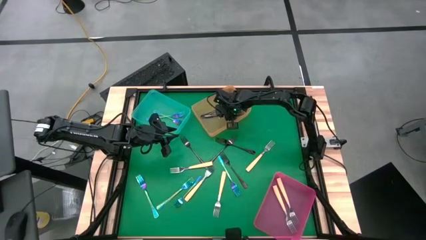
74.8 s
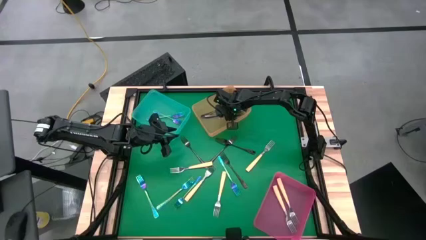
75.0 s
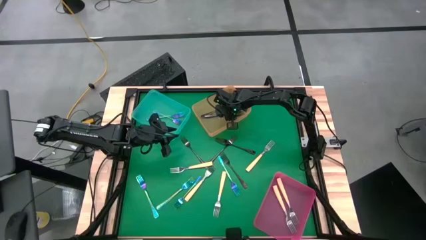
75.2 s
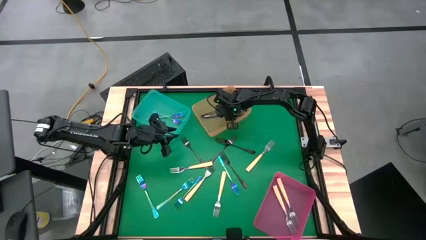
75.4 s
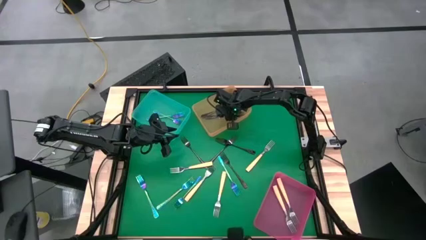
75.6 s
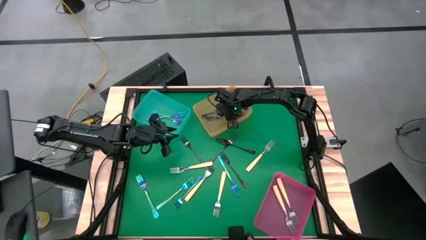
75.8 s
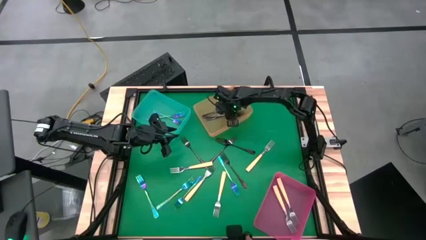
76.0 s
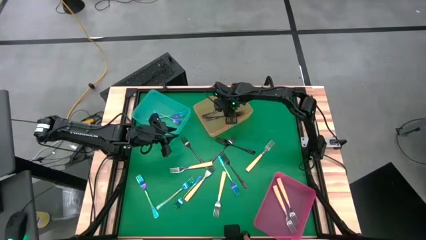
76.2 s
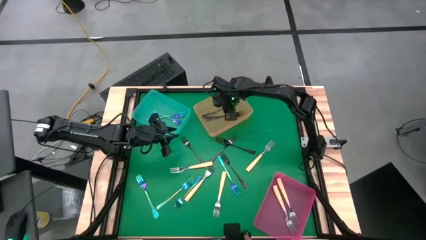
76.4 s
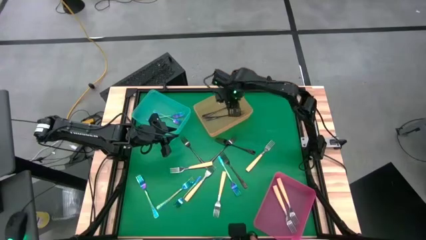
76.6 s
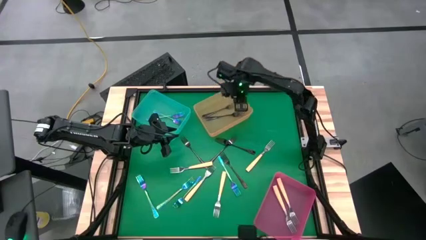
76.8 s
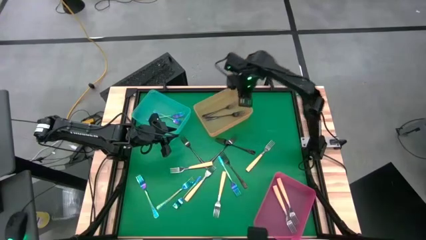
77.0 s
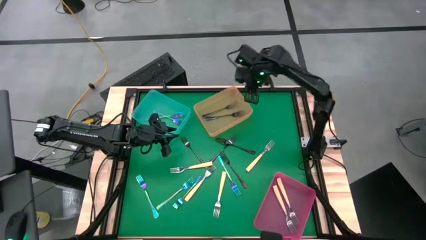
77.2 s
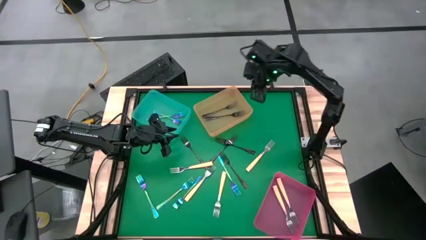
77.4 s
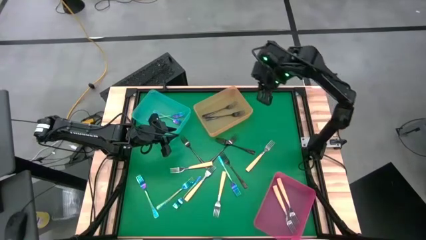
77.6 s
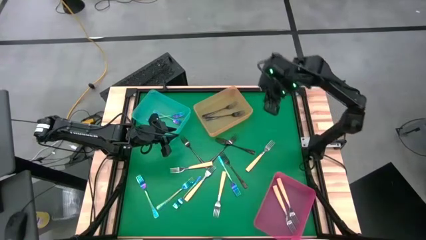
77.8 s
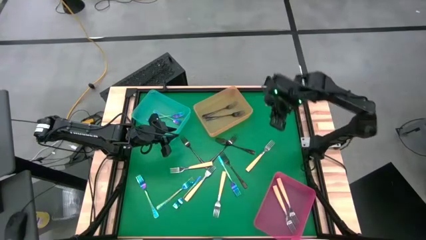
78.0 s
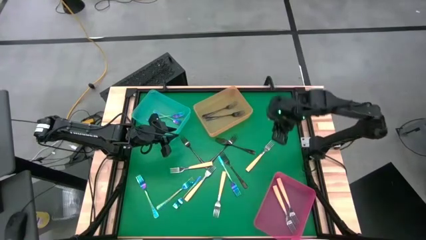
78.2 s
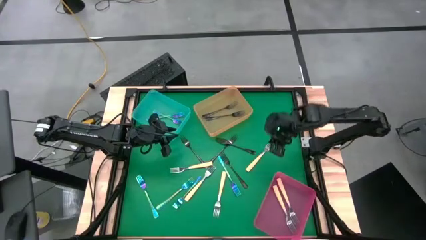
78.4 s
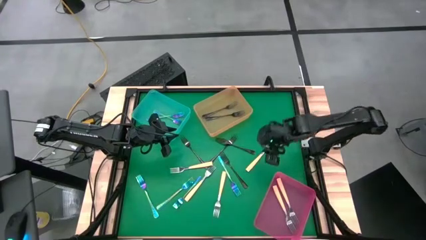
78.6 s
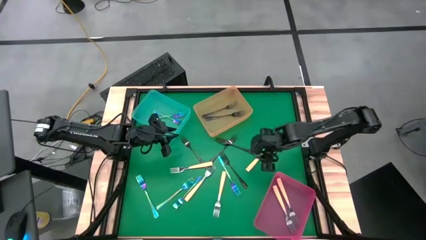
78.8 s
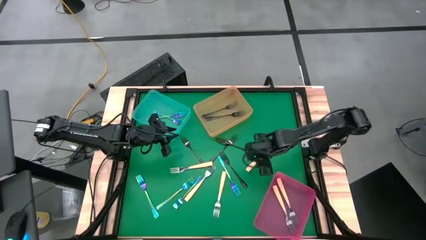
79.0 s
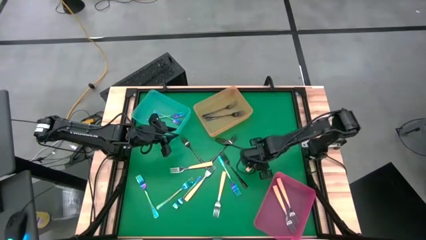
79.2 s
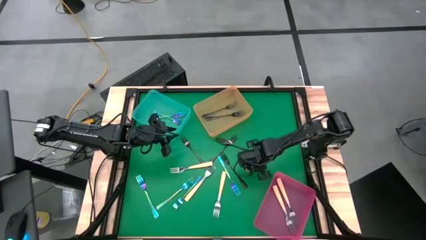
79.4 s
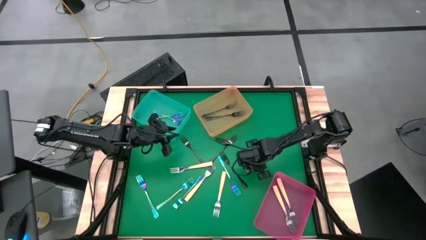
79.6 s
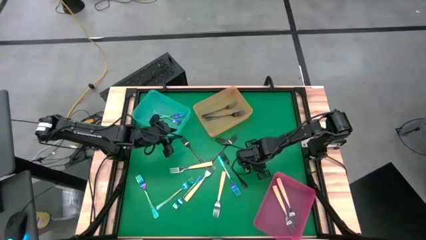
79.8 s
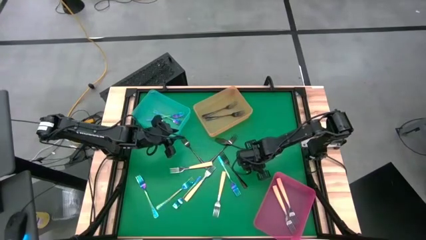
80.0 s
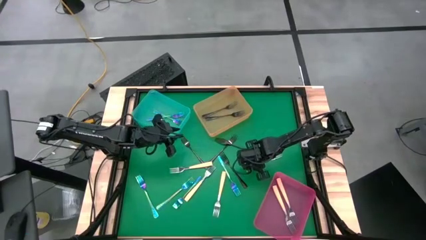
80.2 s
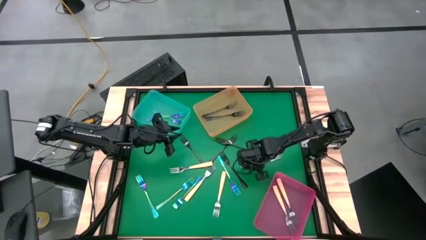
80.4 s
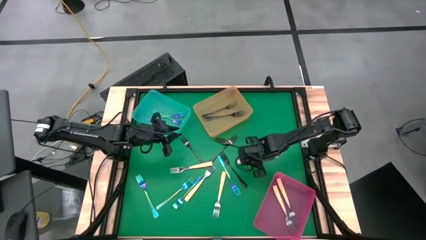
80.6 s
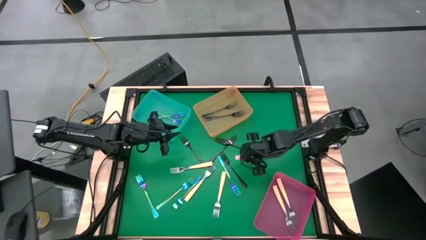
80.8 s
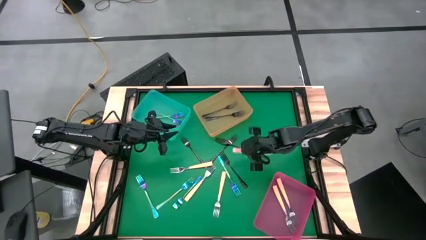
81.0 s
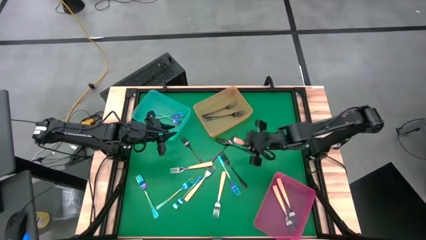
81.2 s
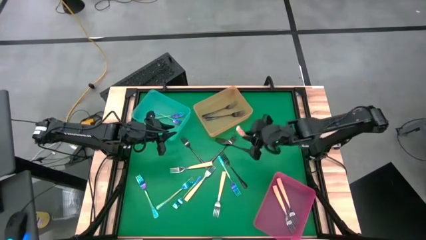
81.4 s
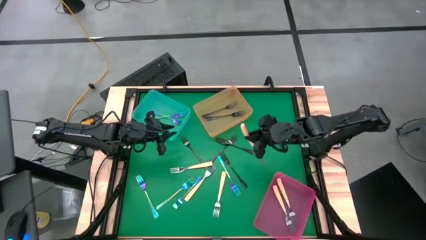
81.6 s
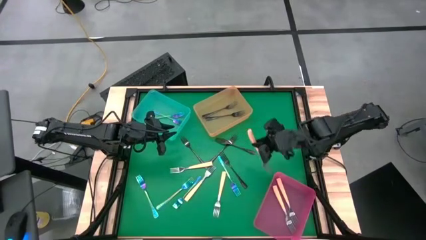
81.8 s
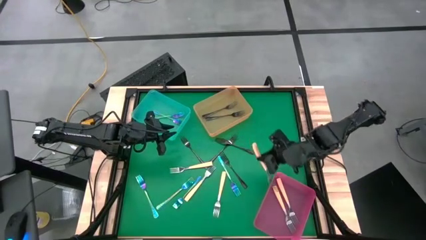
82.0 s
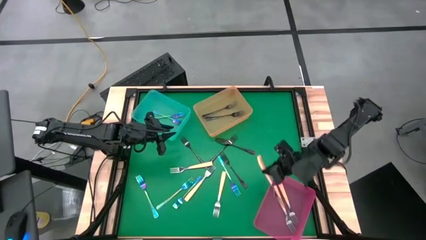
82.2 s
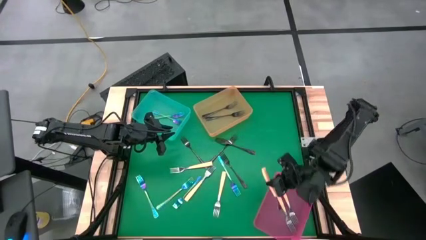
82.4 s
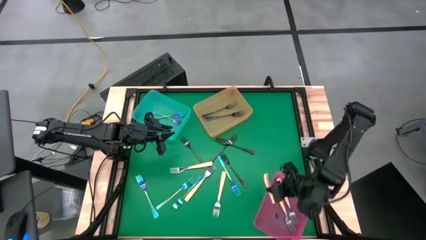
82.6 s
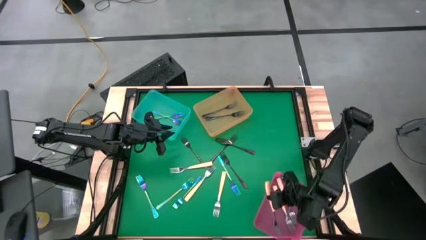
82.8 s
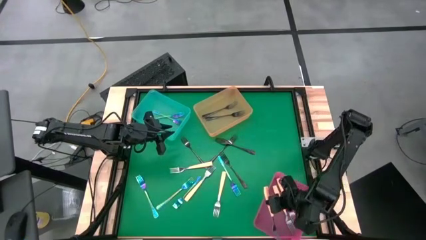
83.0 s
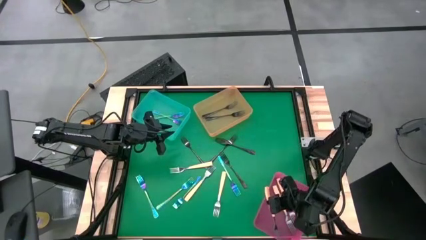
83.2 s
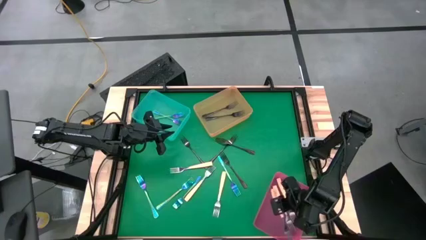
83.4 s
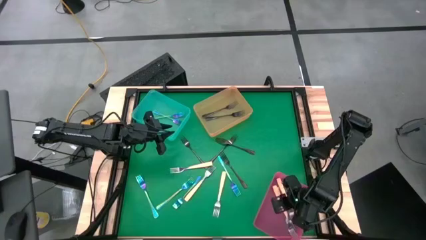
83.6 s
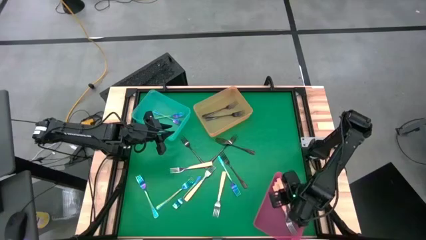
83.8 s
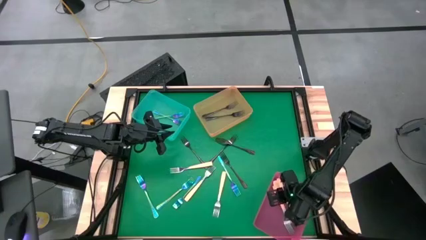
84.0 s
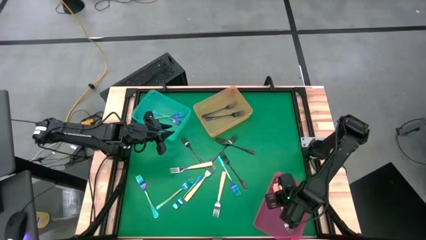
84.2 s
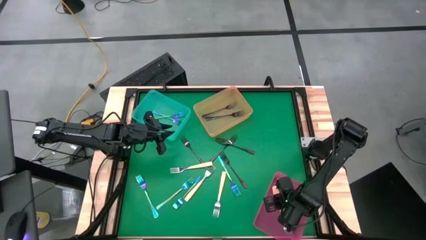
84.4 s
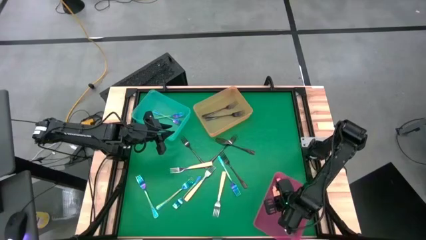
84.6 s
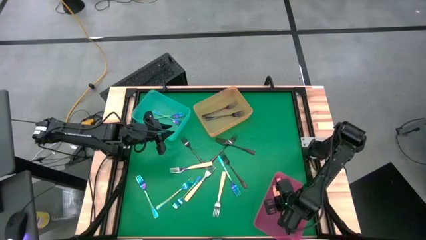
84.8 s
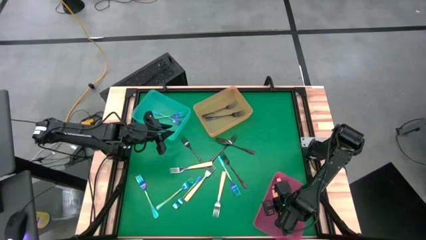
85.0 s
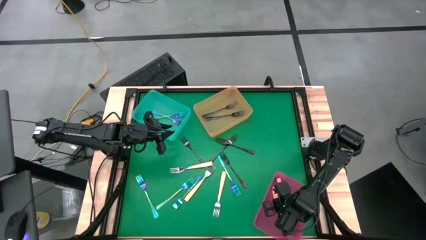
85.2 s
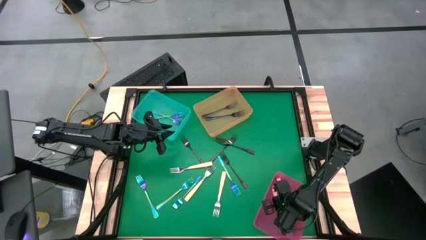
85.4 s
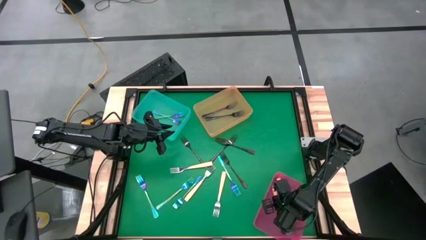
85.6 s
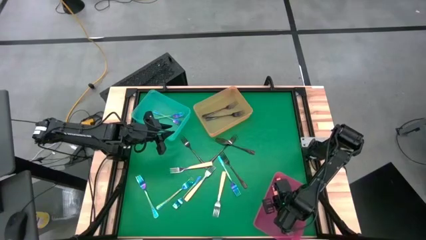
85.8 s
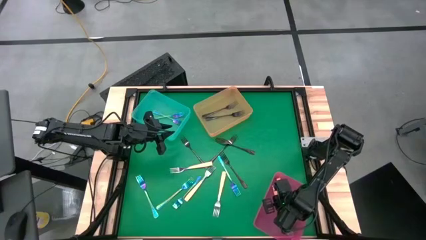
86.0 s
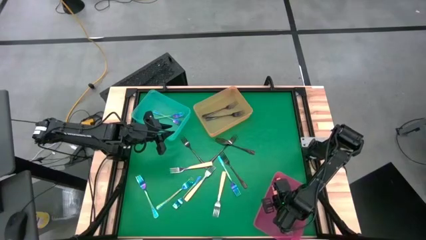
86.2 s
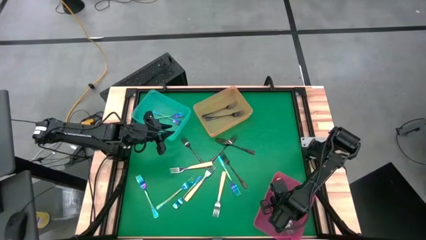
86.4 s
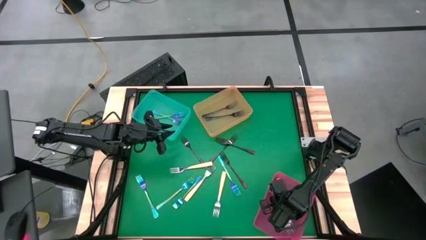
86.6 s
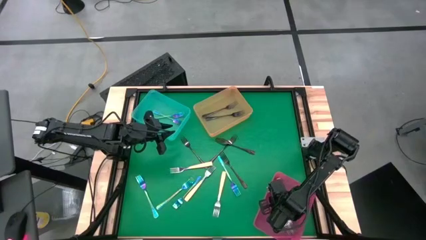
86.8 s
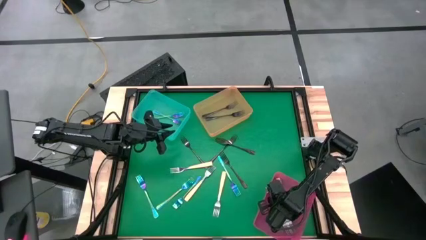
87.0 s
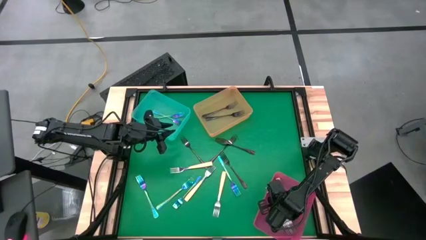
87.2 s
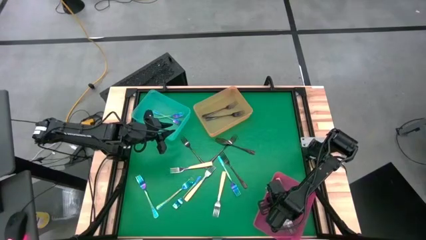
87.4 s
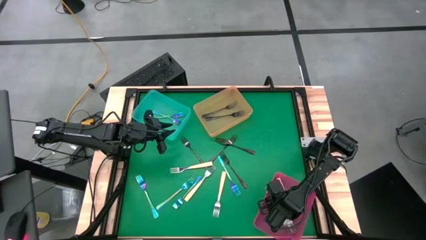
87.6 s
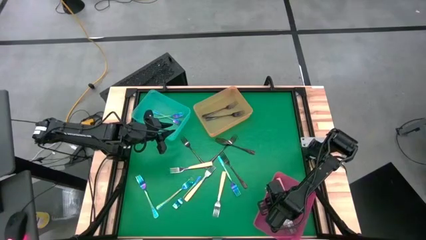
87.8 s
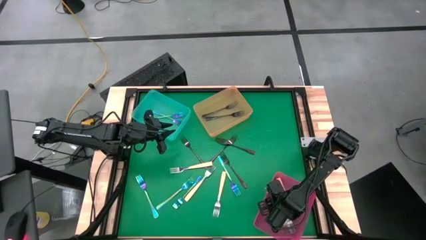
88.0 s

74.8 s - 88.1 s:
Task: Sort silverware by color (type)
Put the yellow fork into the pink bin

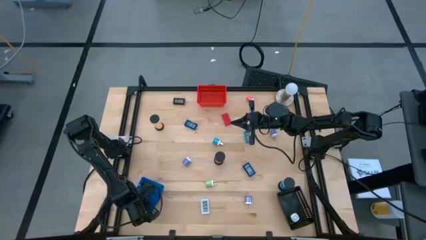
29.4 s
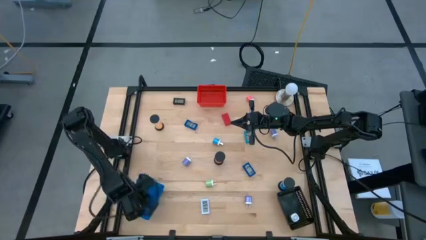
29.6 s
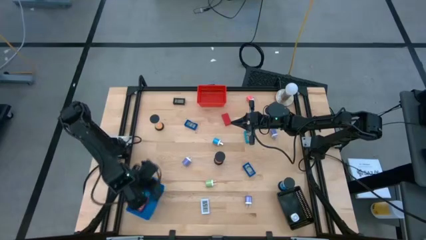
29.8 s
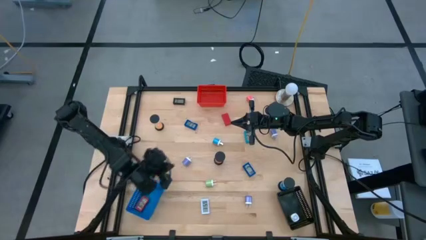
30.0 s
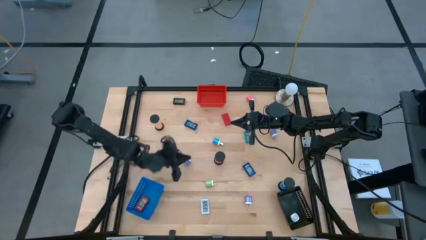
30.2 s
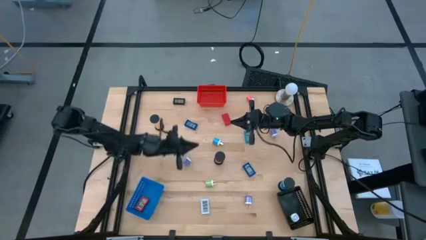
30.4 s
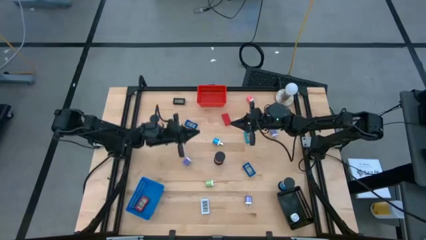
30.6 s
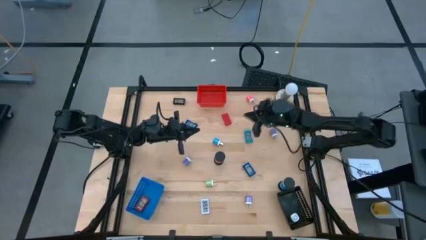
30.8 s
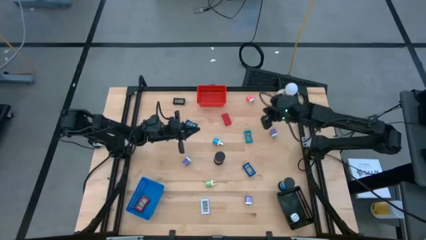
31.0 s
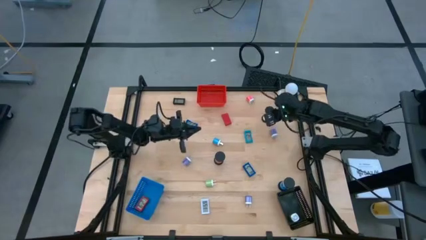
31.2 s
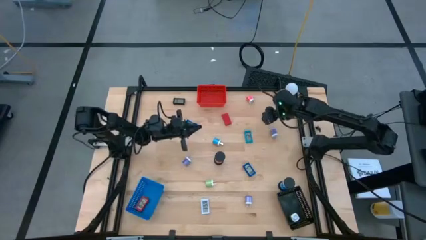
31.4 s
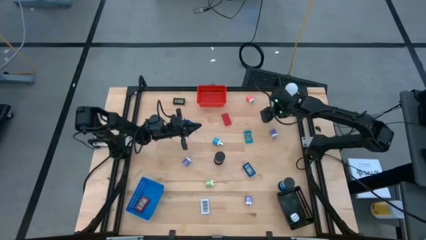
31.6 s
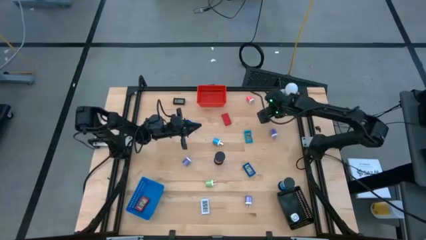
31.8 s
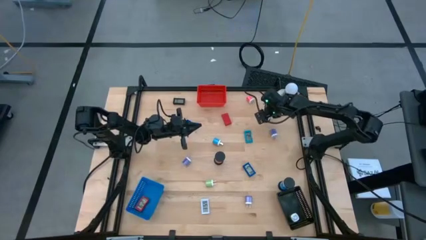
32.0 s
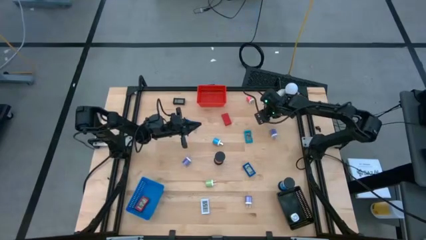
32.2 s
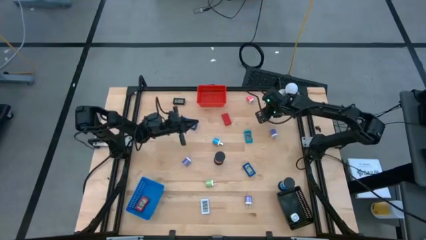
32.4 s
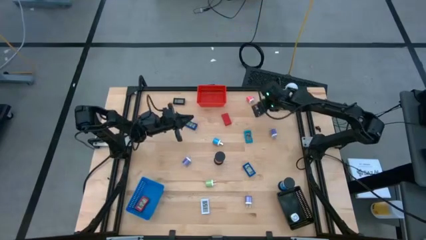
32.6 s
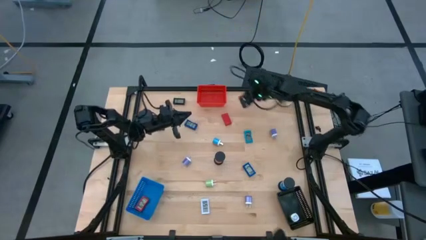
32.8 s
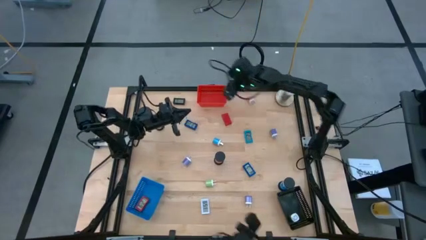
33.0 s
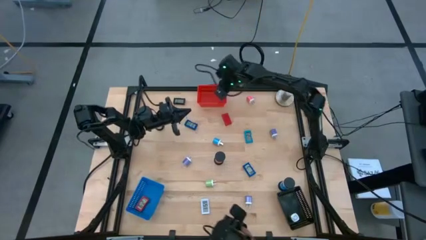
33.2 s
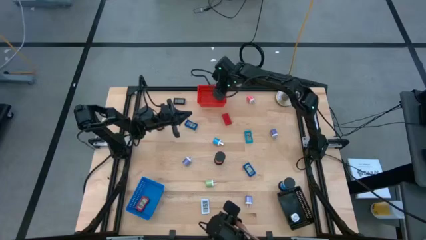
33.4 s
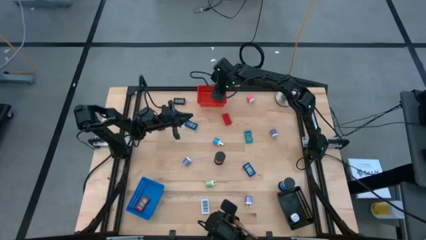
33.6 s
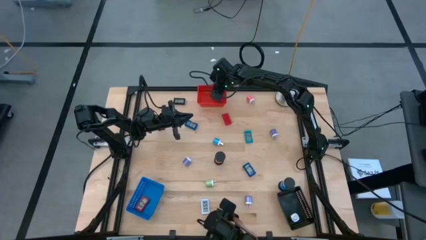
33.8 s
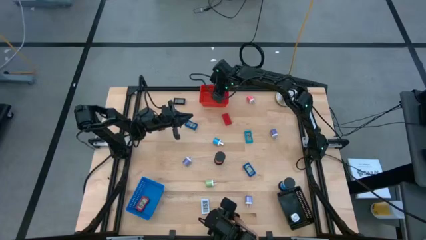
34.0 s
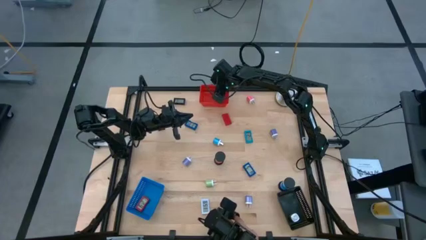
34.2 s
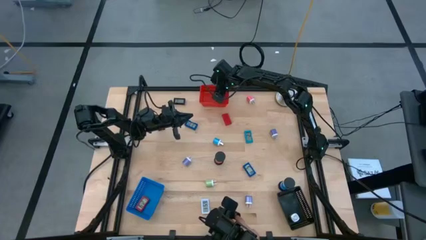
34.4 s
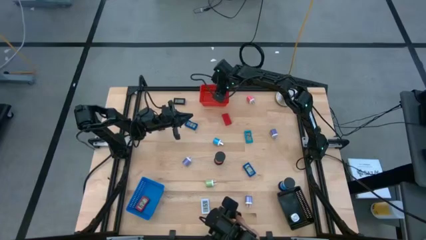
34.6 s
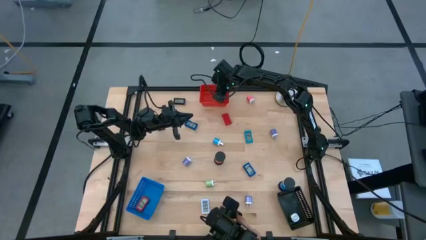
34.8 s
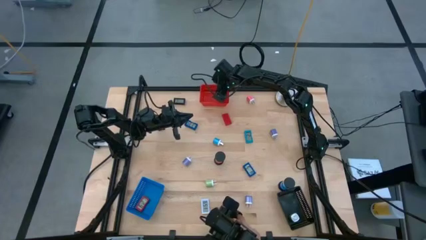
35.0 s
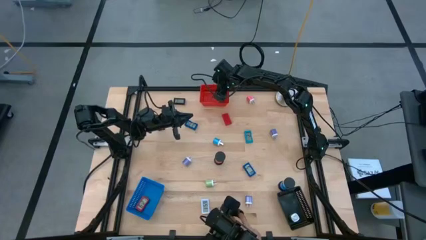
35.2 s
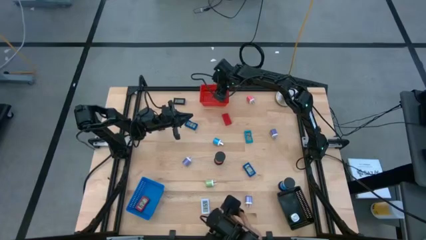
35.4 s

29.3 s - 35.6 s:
Task: Pick & Place Office items
Put the white hourglass into the red bin
